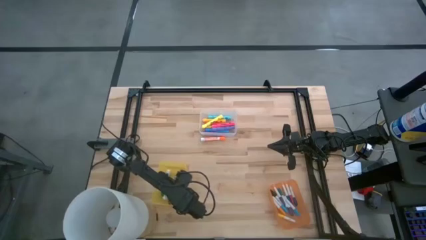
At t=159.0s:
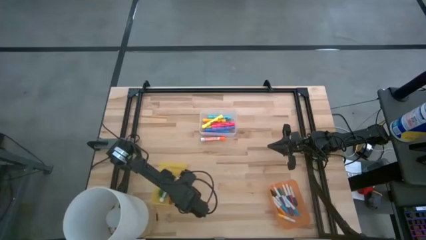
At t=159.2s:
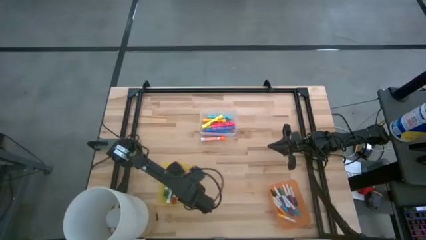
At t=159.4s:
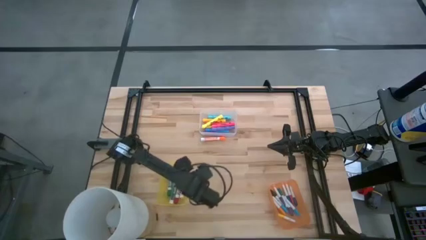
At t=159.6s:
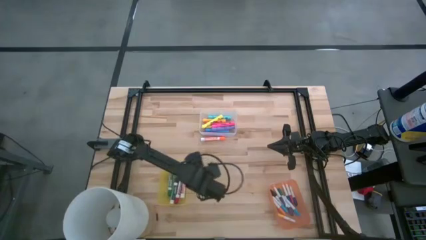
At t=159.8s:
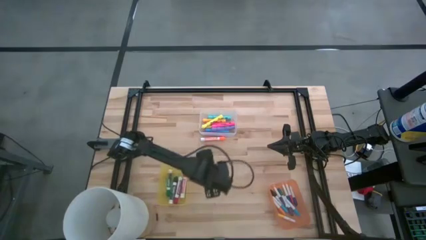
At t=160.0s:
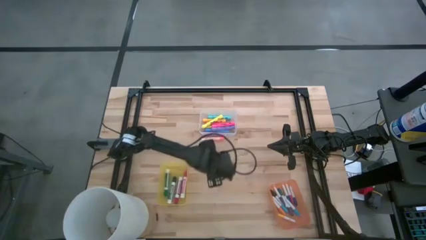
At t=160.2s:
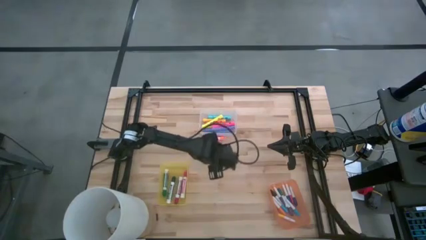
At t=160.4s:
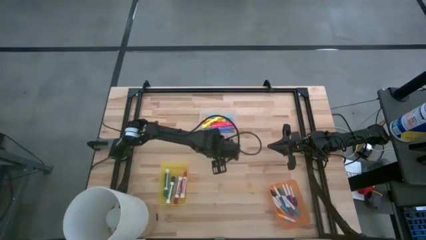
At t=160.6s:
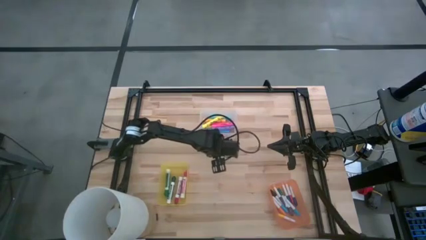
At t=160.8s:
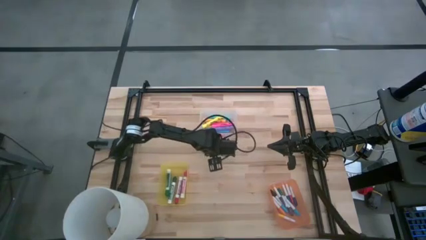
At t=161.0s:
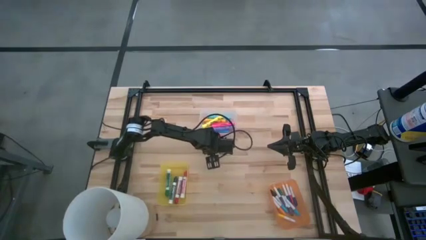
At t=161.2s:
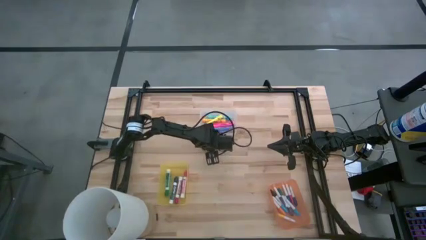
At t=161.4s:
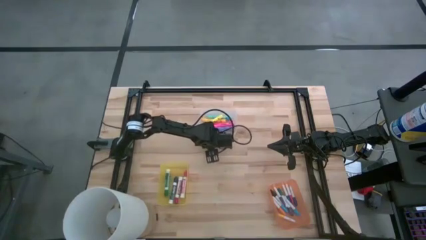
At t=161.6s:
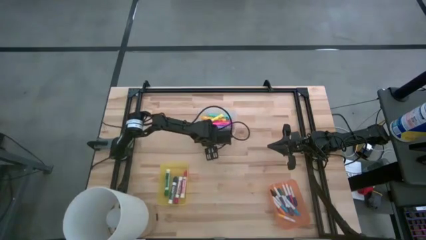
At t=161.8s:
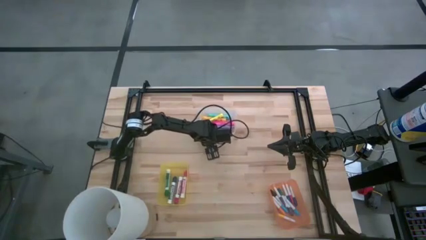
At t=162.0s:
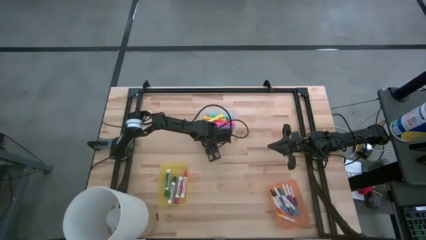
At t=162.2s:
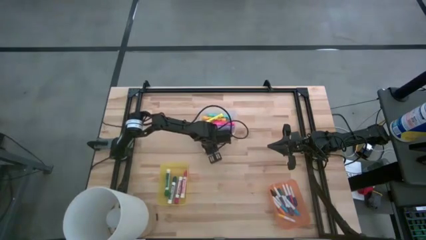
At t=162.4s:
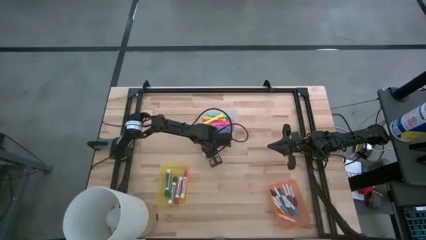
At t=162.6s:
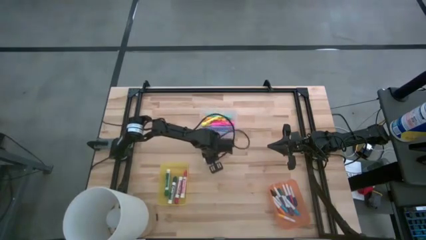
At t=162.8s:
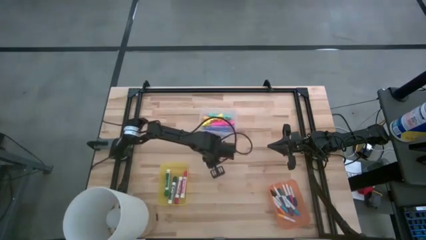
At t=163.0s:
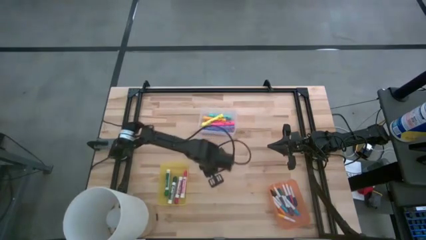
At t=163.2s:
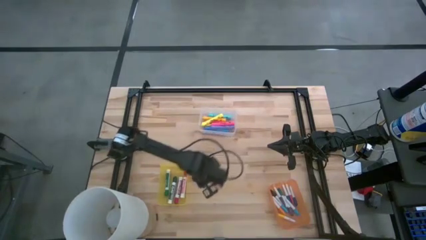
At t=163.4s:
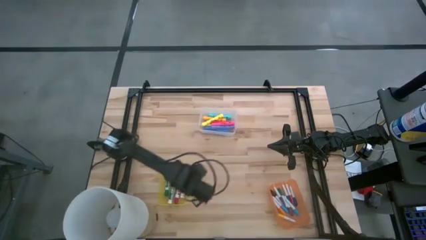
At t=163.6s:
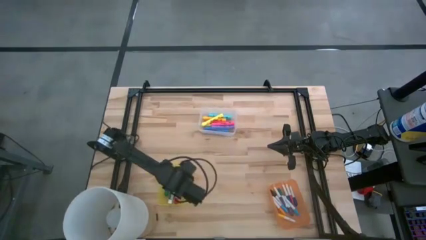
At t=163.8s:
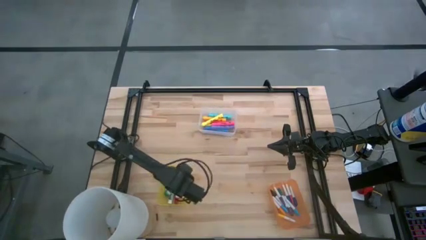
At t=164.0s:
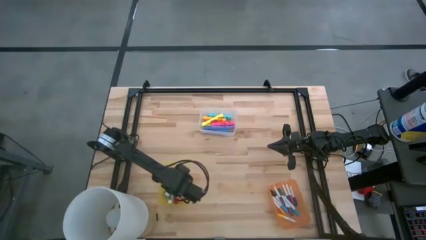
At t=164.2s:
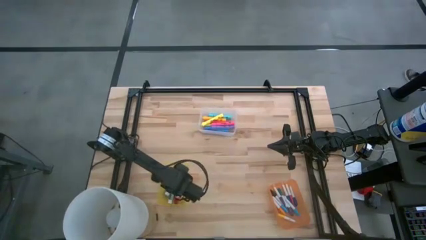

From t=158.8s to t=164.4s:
Task: Pick & Place Markers
Put the orange marker pen into the yellow bin

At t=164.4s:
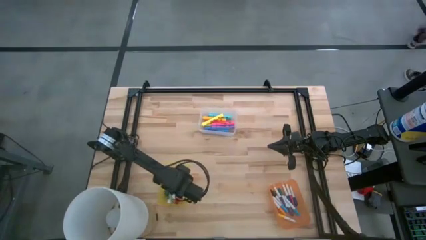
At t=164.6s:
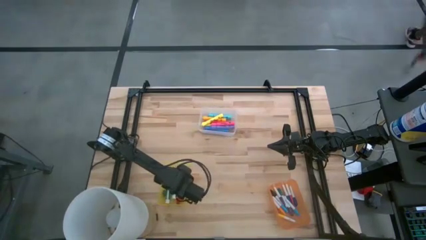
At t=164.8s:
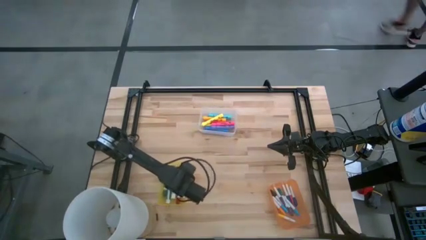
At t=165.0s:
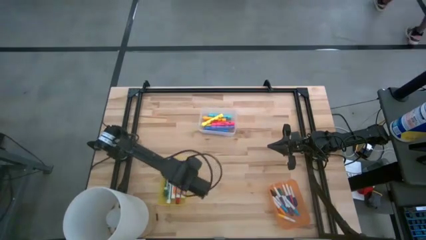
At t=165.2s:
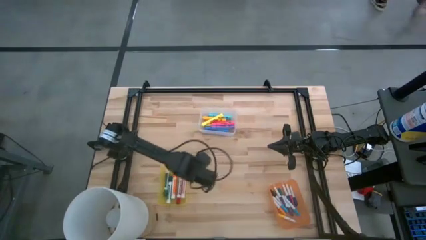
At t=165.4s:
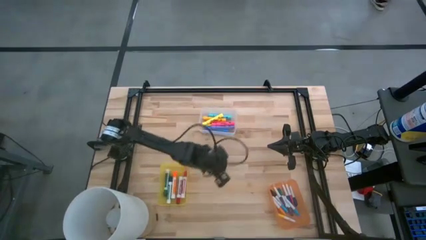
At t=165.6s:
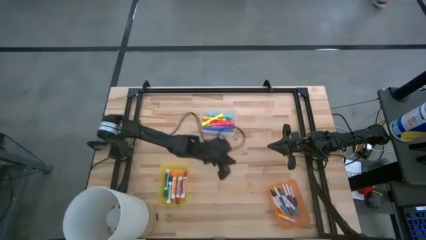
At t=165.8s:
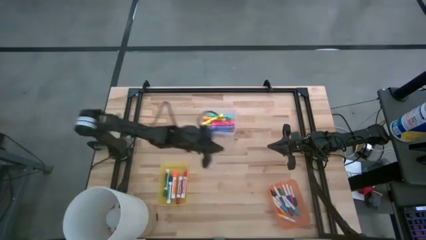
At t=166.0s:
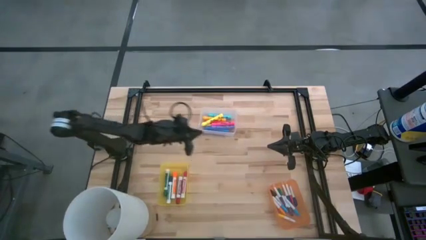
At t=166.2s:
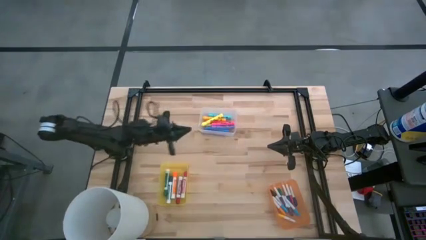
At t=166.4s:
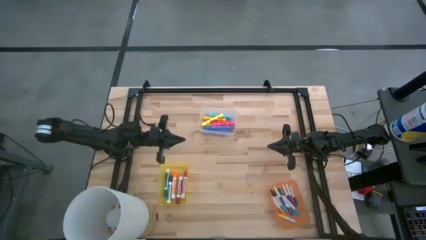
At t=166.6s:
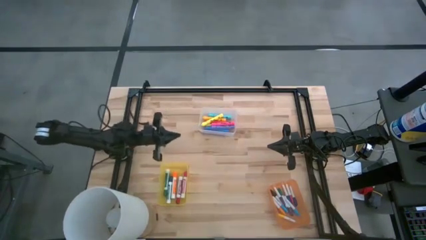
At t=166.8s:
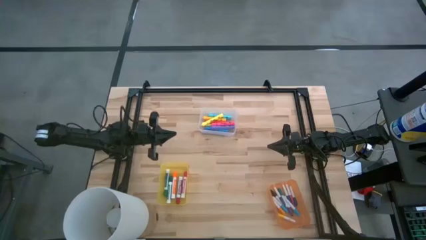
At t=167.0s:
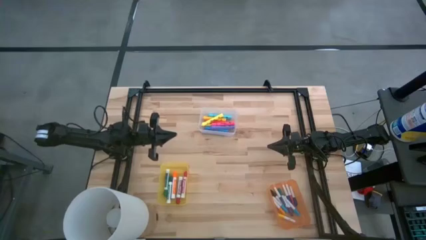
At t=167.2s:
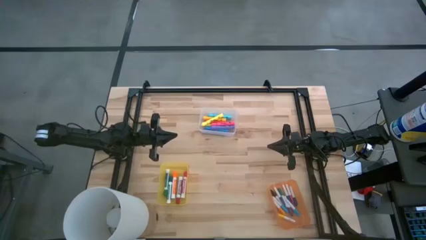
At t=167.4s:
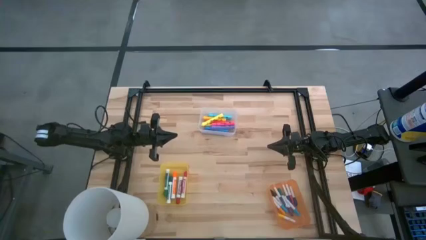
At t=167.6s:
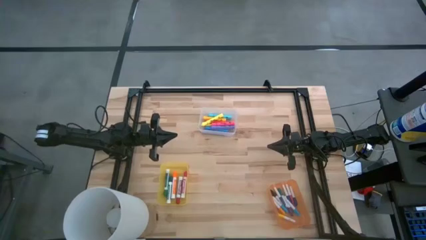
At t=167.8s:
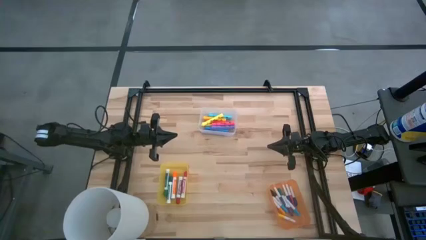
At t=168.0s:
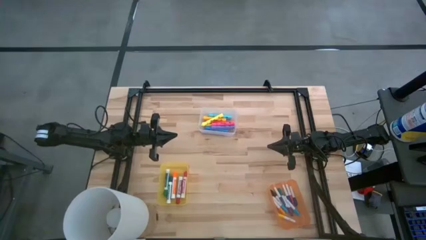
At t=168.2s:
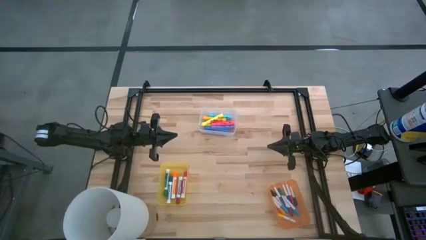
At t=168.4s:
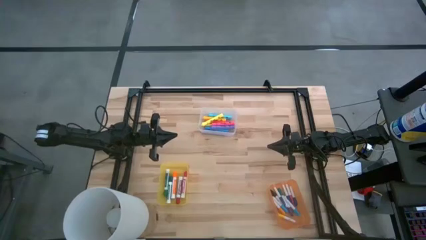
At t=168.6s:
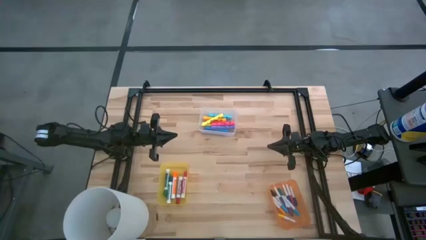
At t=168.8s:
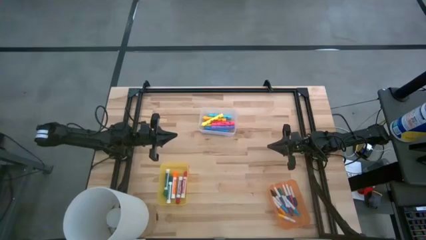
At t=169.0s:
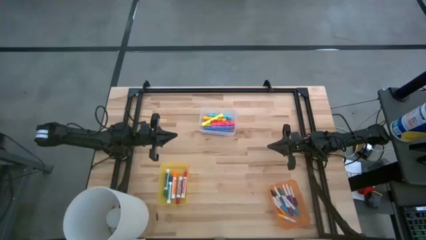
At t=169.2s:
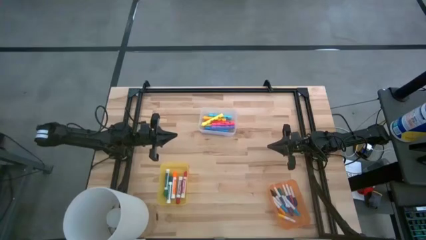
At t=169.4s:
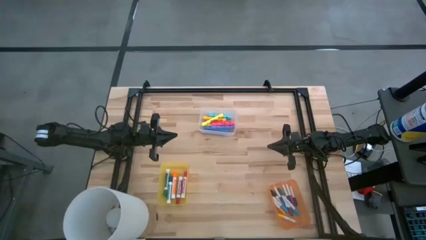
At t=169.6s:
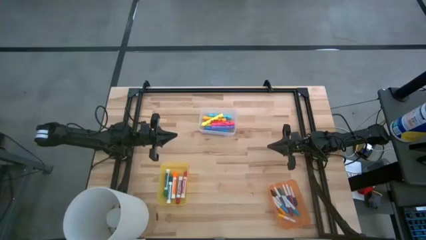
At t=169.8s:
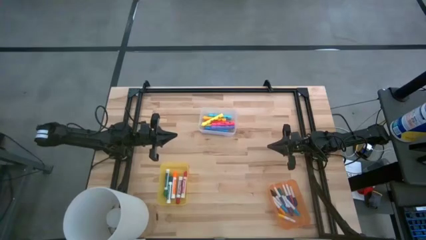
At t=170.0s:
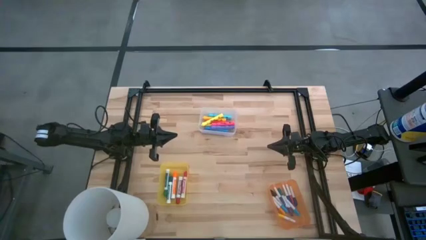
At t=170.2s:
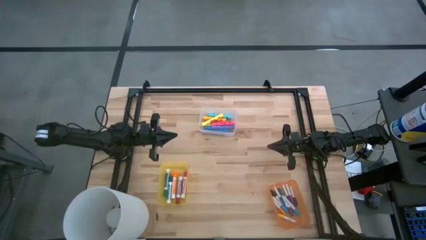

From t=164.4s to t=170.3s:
Return to Home Position

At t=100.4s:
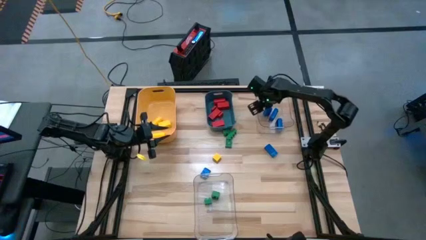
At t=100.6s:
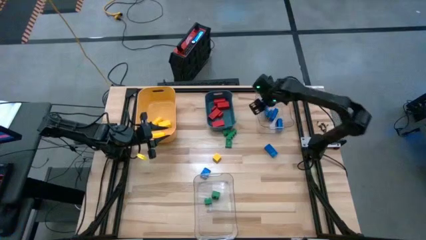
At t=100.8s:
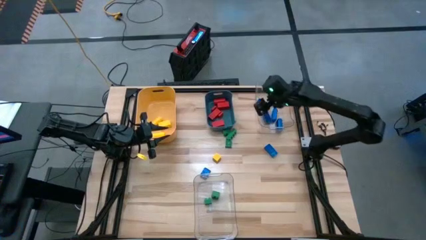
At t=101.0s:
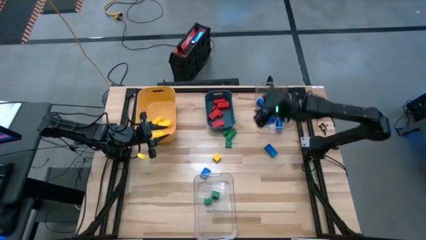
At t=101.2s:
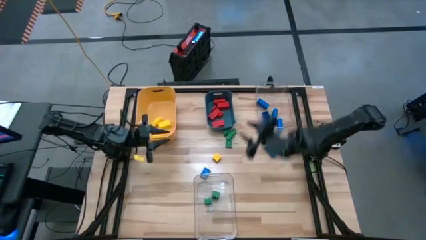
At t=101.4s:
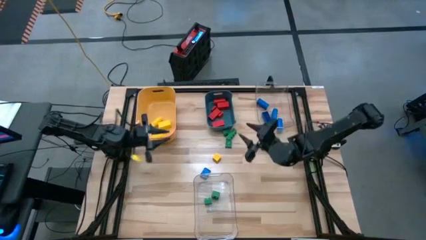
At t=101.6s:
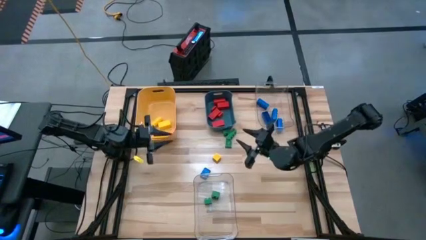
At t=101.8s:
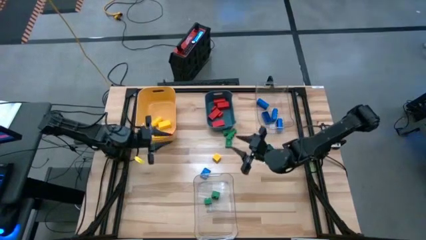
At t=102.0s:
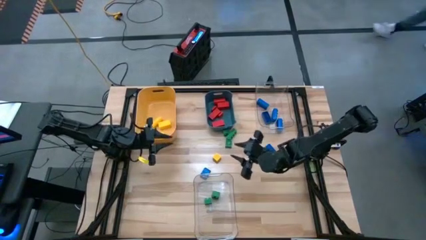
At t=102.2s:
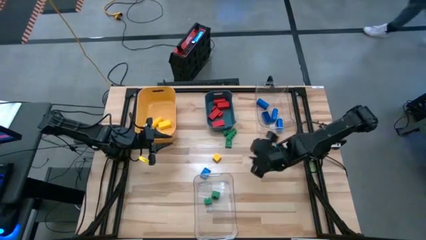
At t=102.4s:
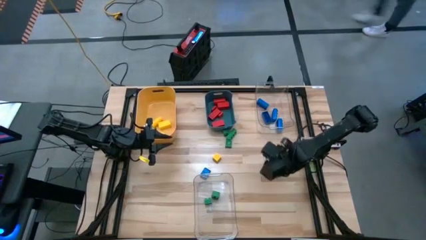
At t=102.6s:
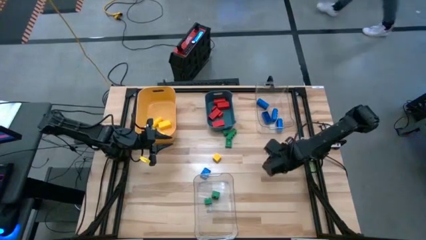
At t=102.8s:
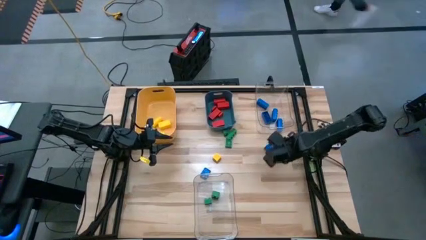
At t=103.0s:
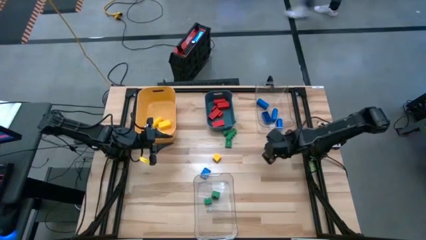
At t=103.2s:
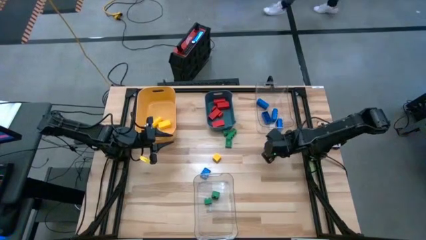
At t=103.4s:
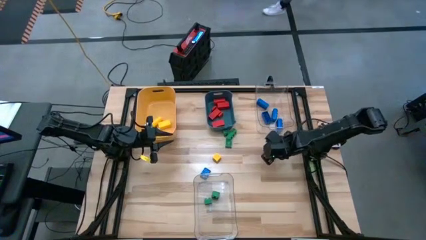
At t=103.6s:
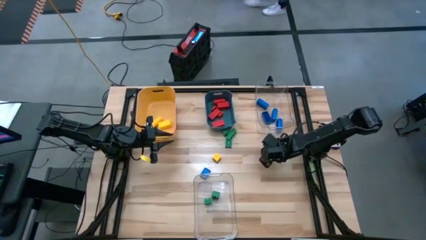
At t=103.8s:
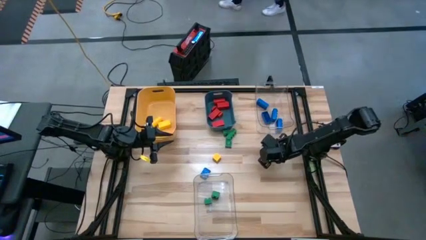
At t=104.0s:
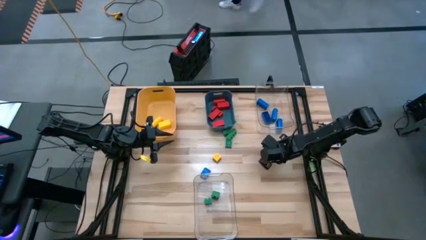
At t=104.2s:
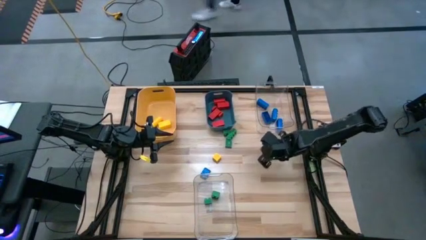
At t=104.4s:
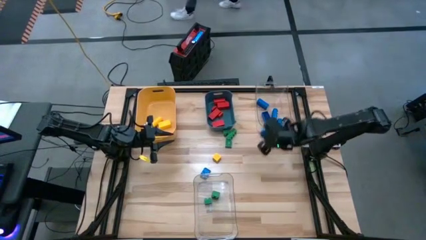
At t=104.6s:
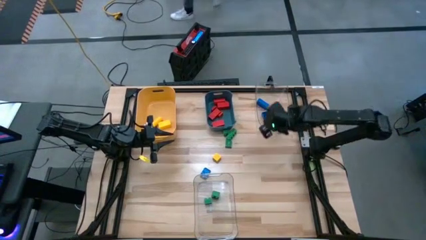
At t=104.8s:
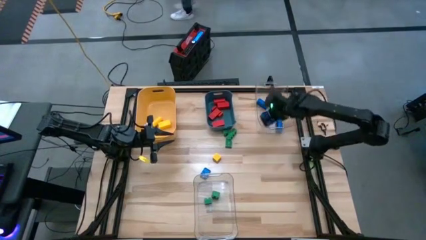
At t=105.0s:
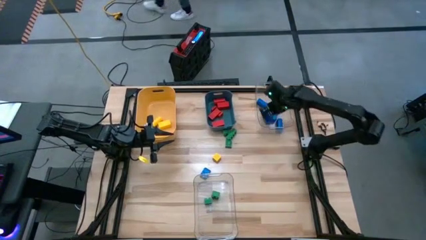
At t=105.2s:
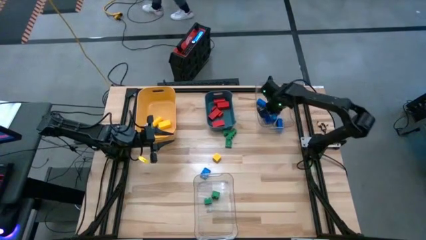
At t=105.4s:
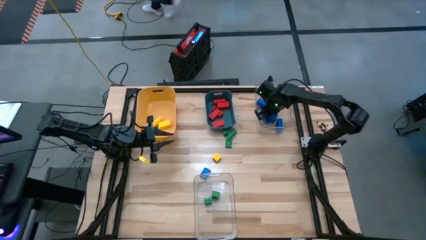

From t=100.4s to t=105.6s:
Task: Sort blocks
Put the blue game piece into the top transparent bin
